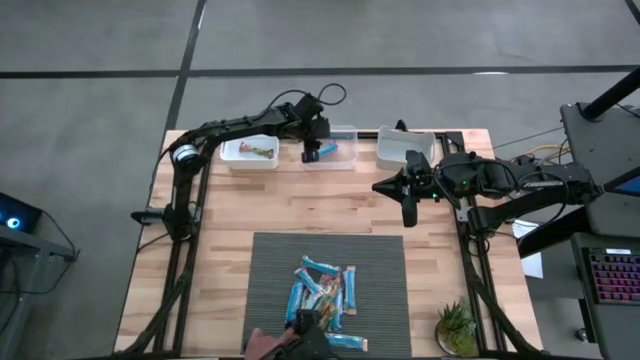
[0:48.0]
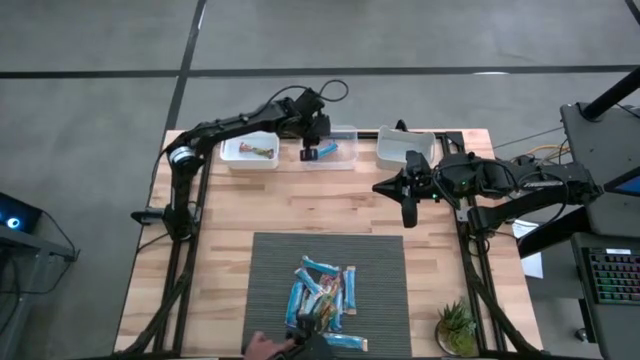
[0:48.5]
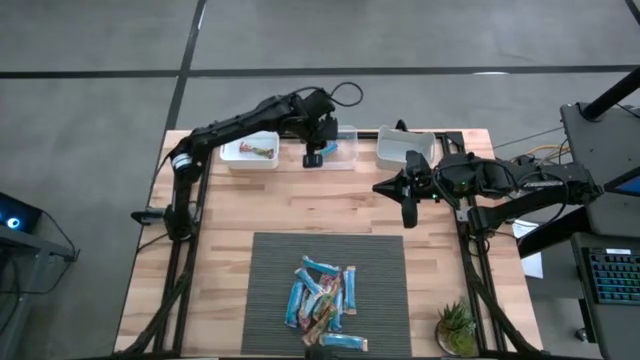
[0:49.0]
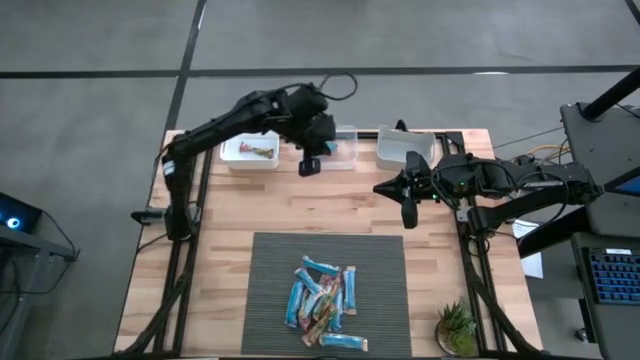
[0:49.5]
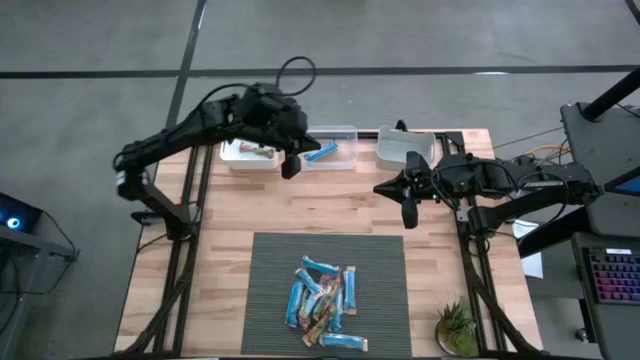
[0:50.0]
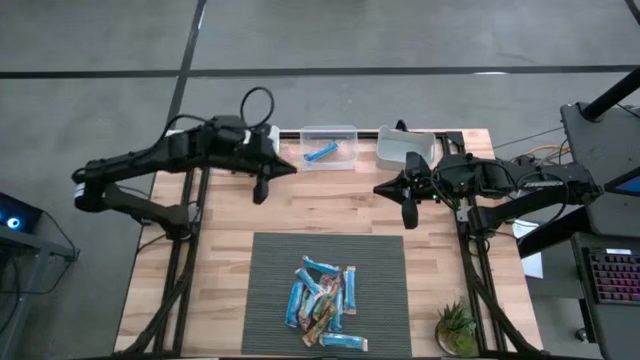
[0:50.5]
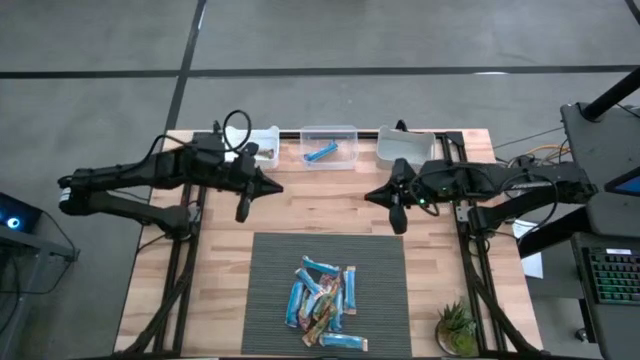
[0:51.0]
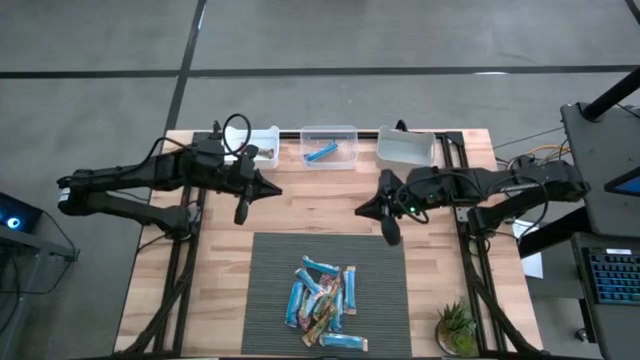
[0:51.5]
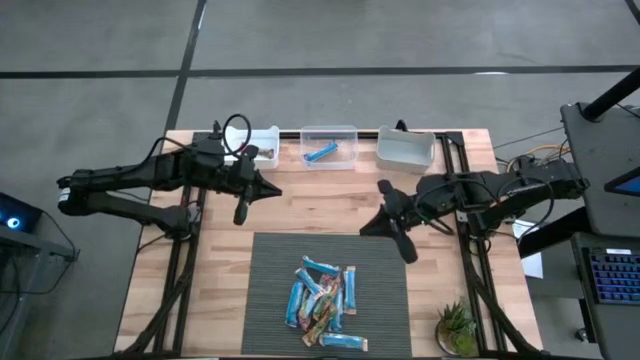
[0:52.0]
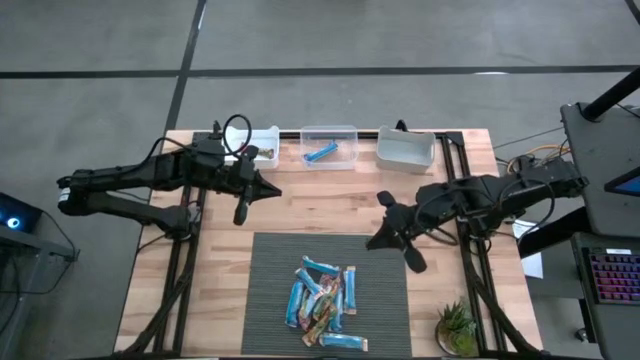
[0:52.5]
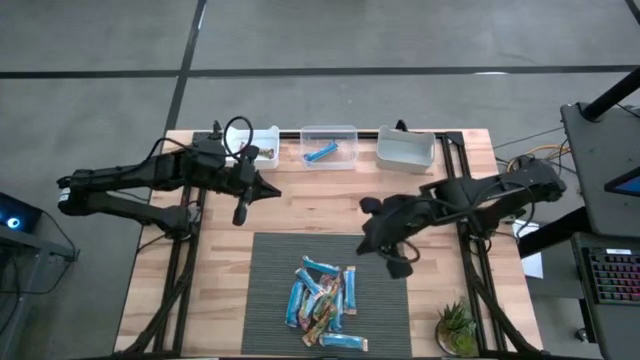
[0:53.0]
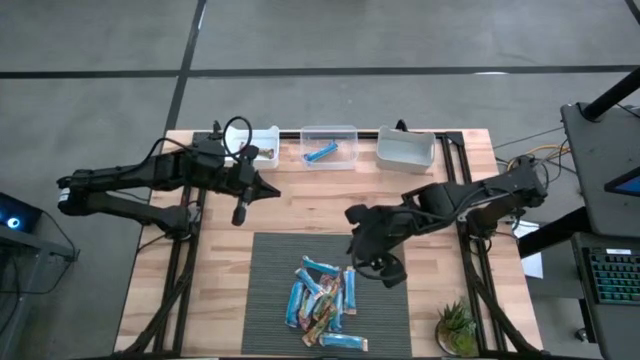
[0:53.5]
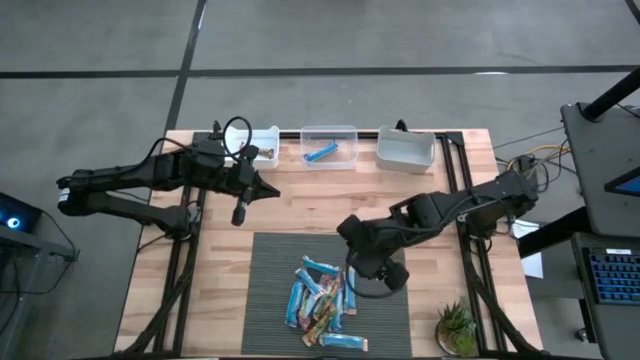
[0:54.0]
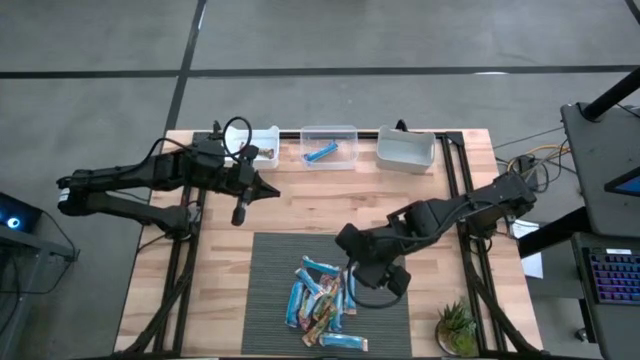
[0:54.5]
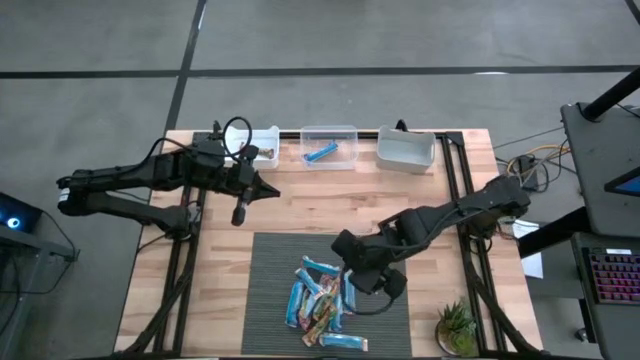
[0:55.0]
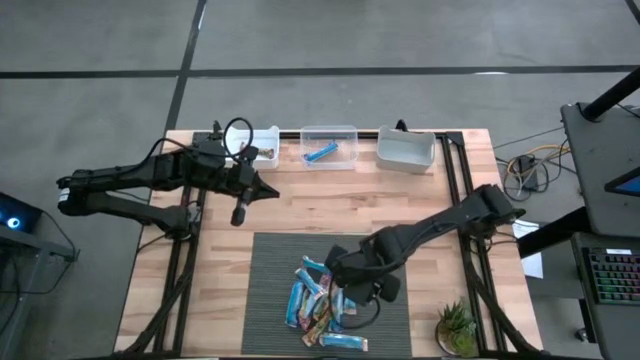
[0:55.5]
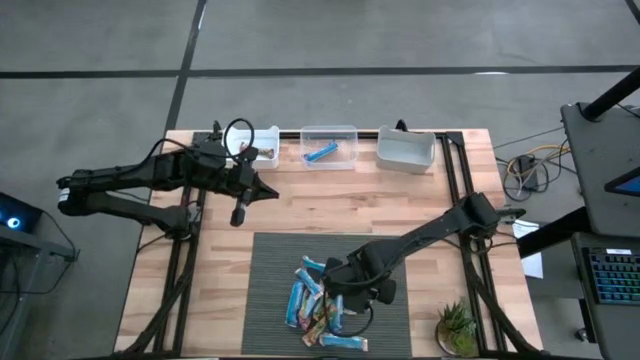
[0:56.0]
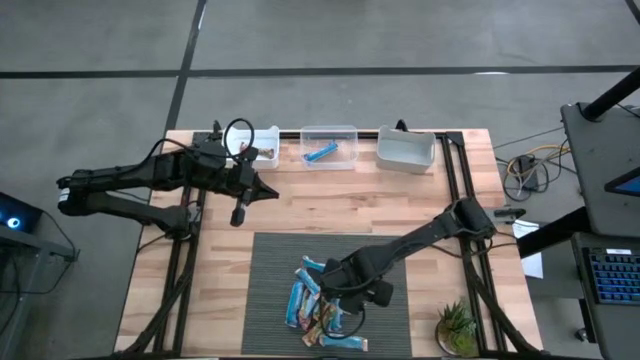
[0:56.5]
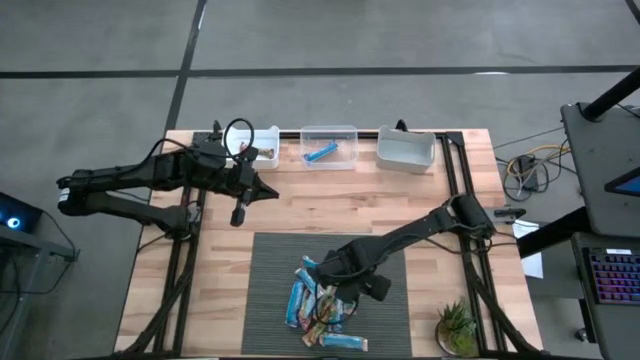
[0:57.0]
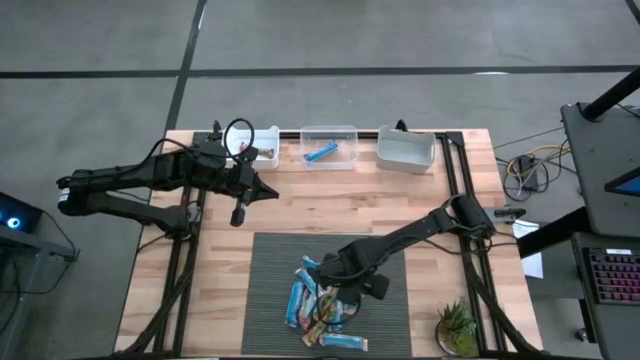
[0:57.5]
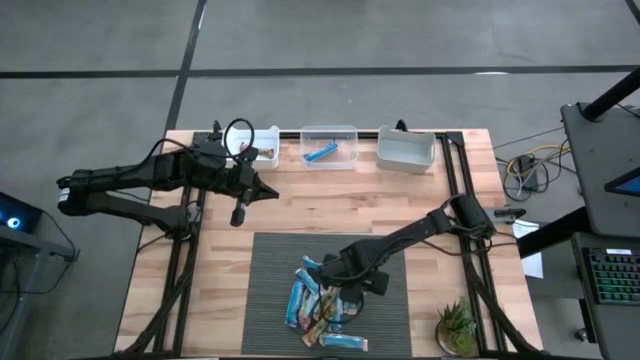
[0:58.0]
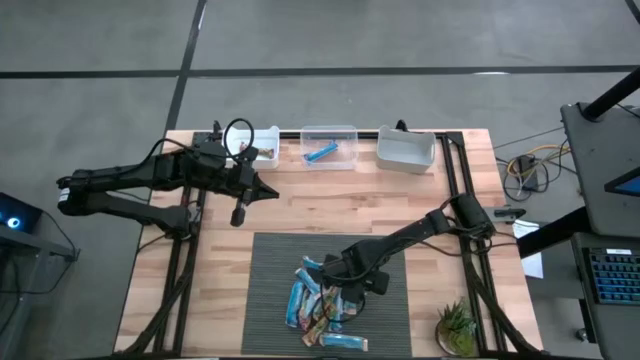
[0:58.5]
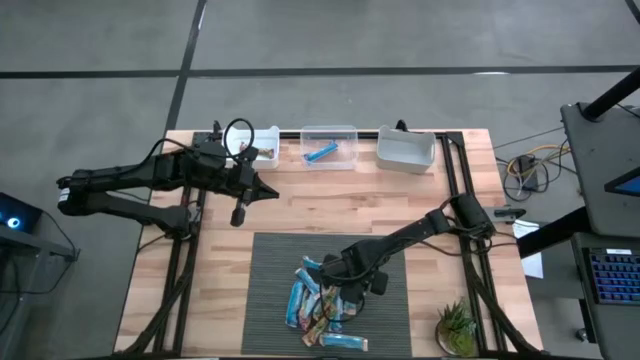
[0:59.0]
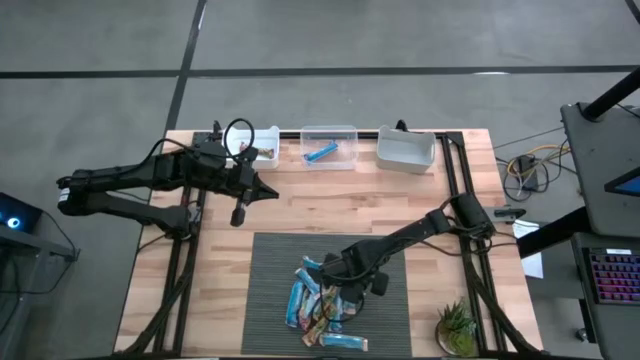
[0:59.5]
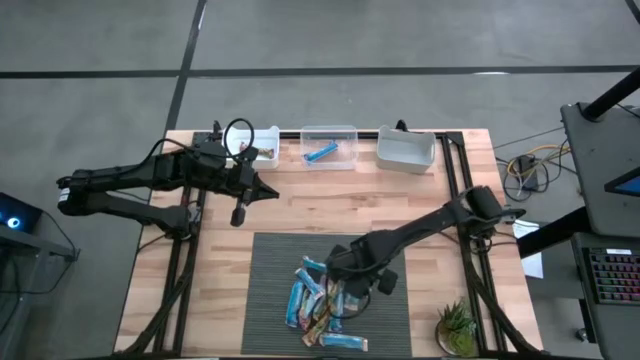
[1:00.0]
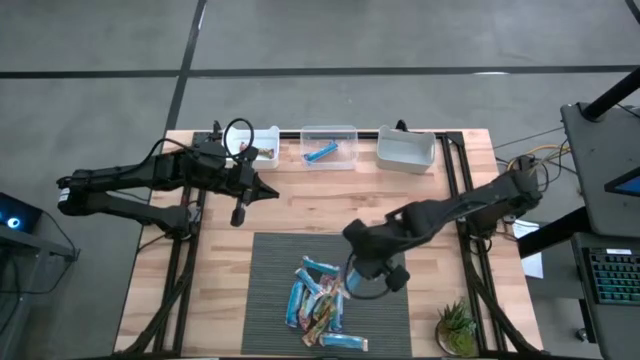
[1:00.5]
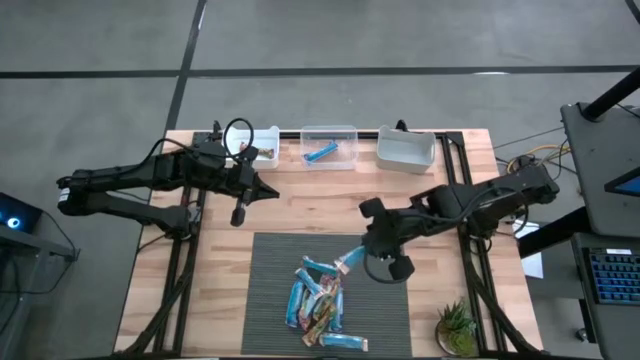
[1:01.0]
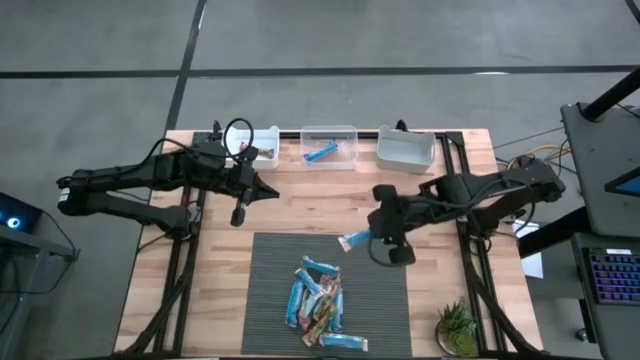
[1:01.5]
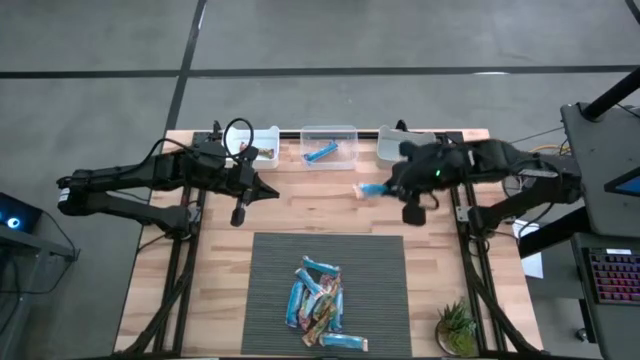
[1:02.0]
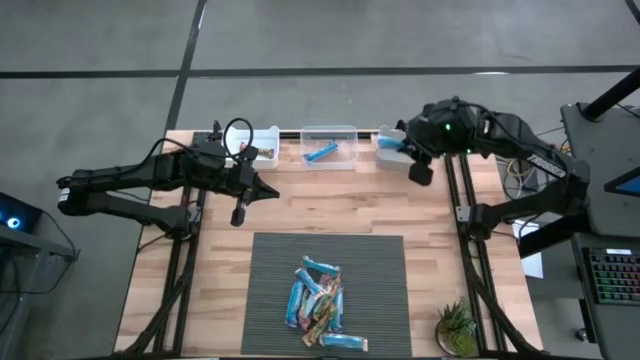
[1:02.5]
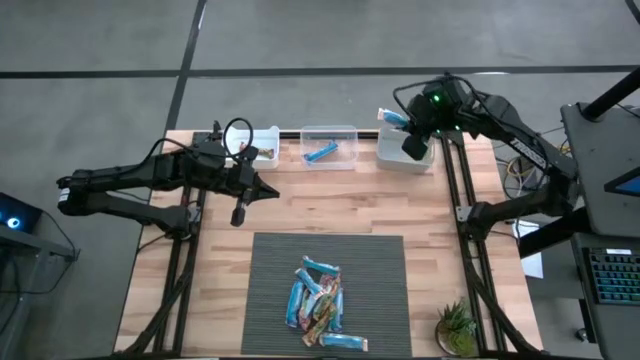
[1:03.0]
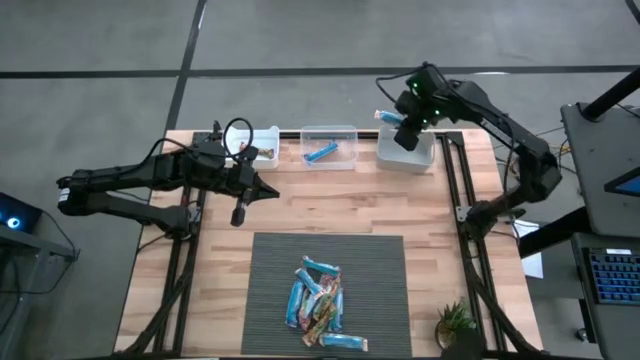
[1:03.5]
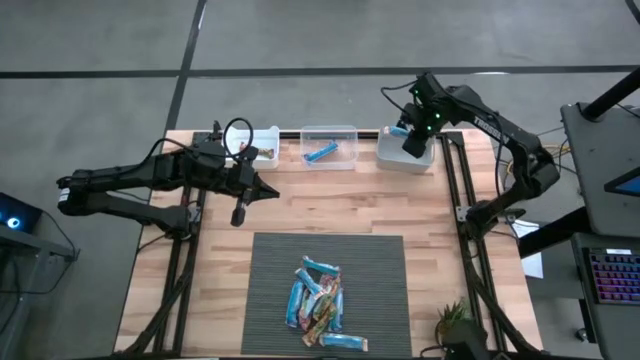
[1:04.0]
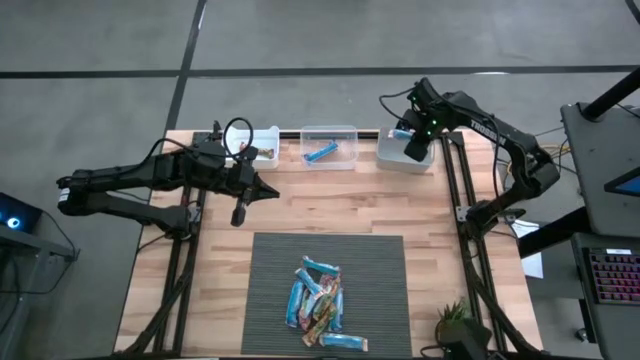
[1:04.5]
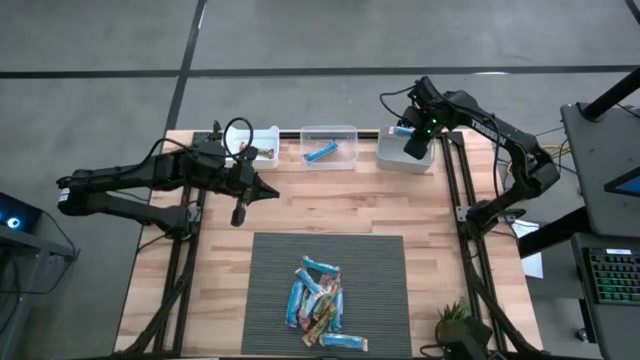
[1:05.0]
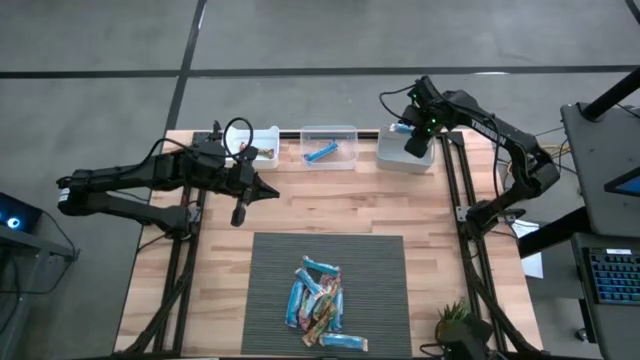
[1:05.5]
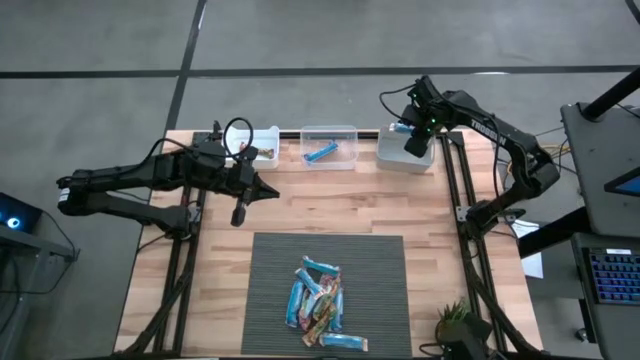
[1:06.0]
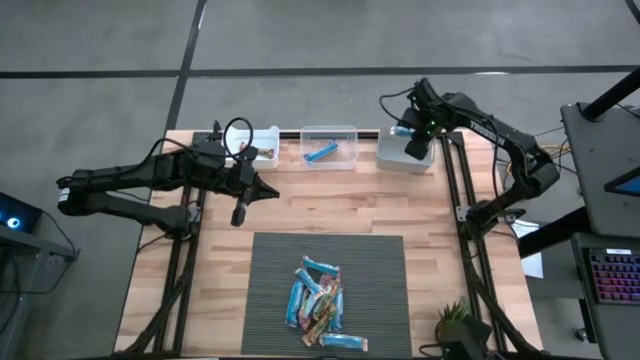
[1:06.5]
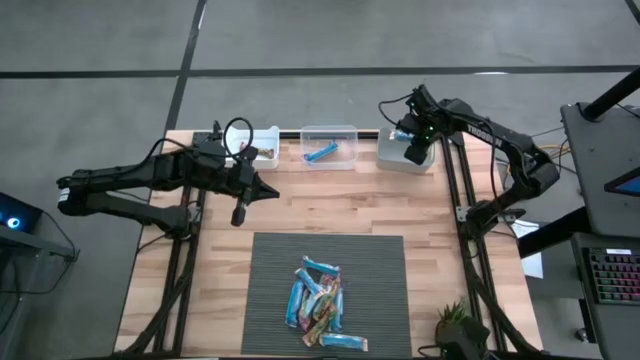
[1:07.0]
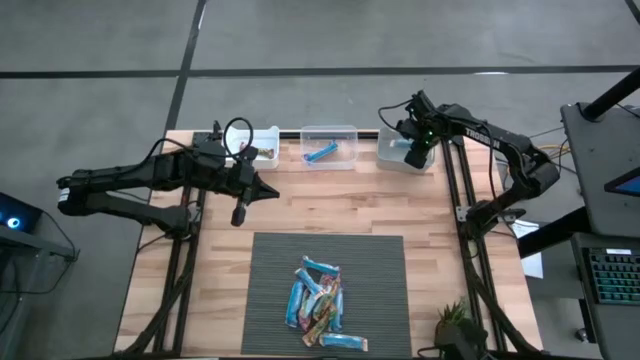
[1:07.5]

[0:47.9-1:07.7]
Task: Pick and place Granola Bars by type
Put the yellow granola bar into the gray bin
